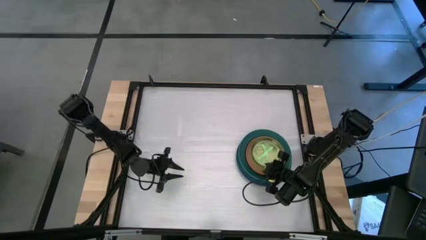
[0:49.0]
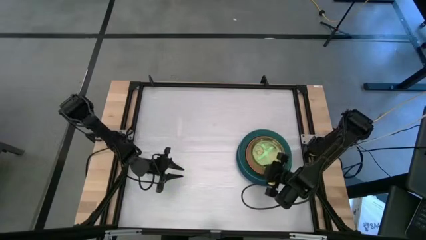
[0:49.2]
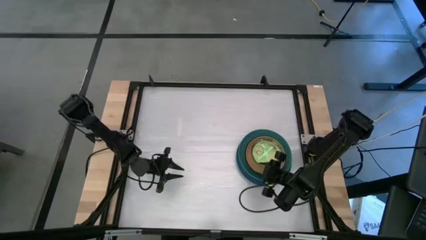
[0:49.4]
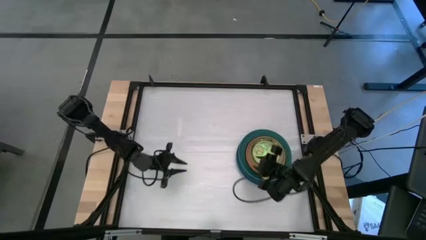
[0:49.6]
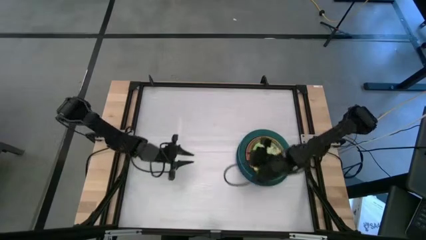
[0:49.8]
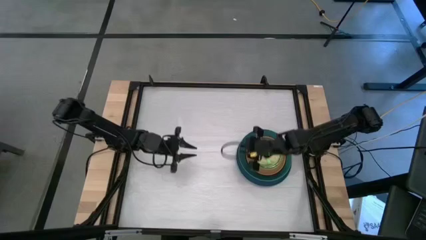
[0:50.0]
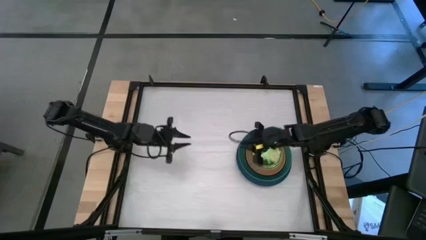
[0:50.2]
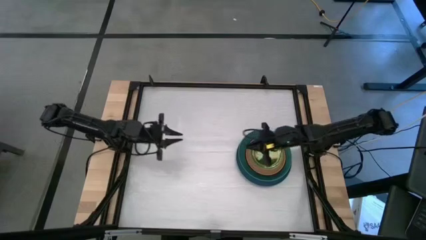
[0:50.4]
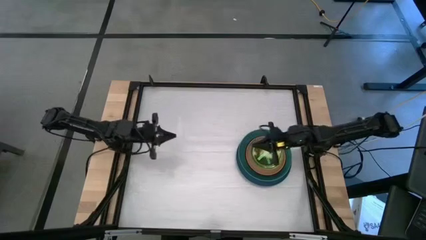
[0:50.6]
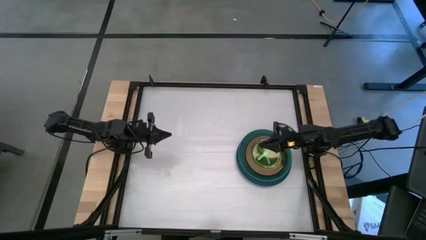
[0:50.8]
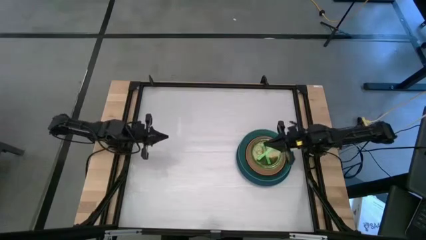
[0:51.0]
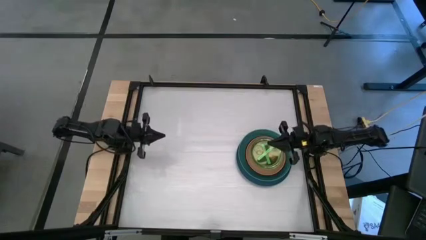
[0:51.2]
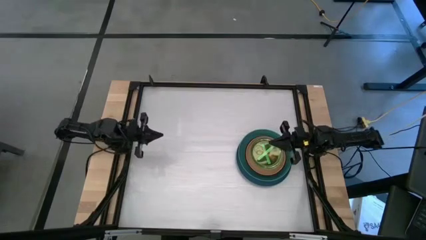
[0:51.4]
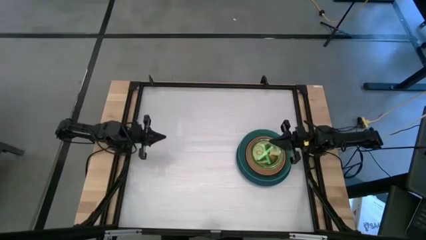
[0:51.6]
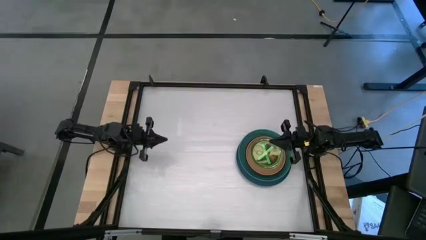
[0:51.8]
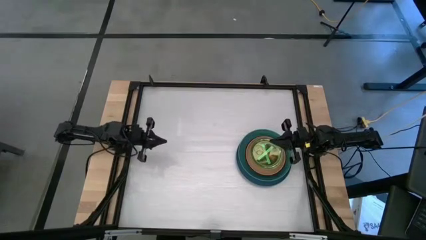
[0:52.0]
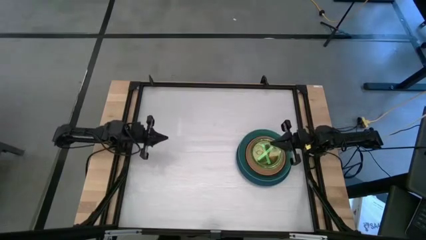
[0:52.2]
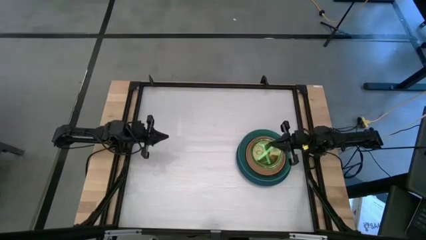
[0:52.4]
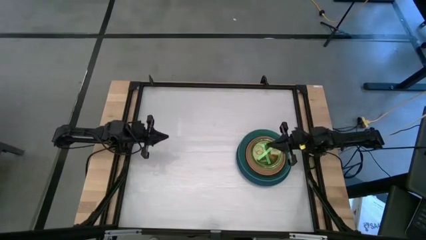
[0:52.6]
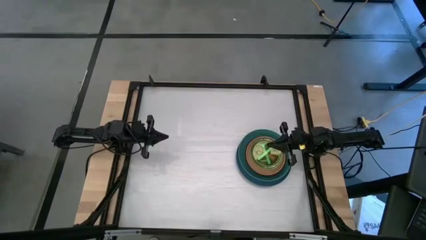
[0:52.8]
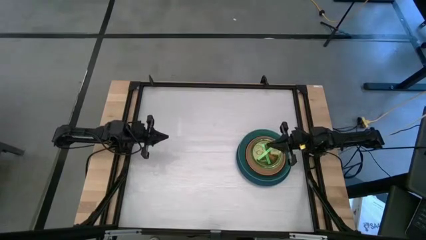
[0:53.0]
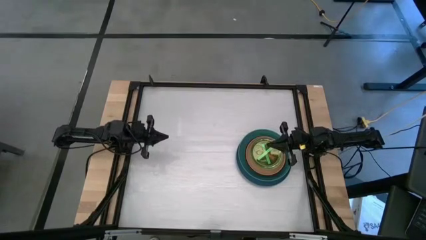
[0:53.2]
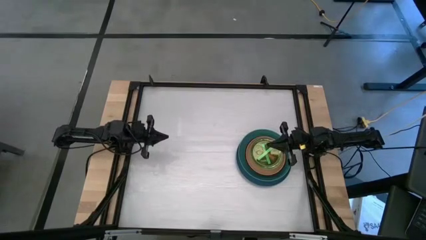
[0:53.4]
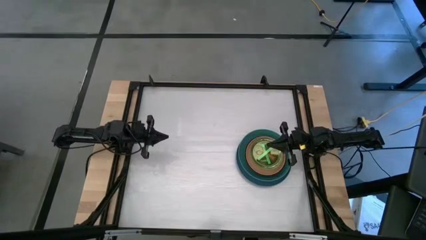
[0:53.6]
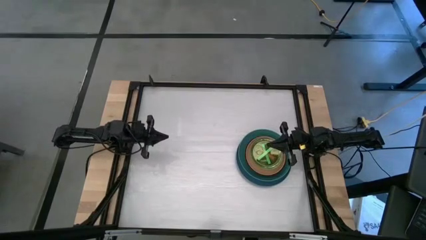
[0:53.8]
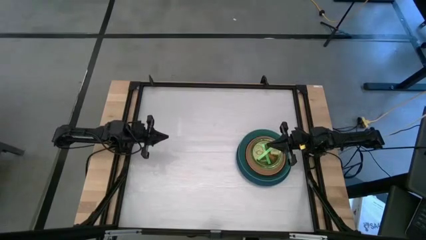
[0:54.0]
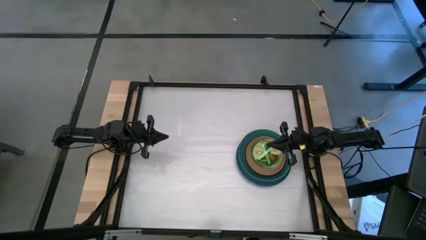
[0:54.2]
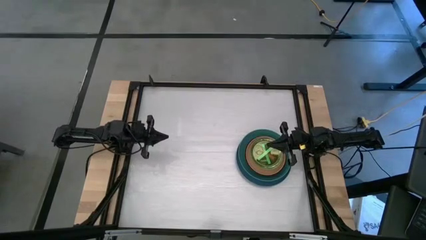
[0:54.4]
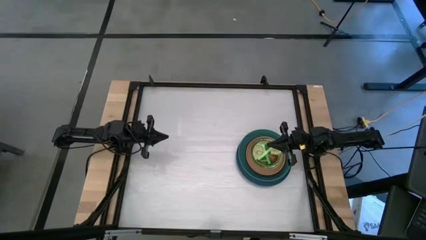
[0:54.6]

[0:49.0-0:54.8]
Task: Stack plastic plates
Return to Home Position

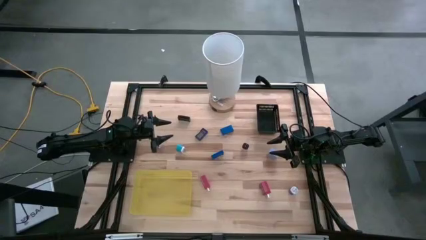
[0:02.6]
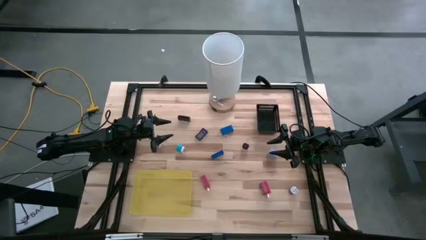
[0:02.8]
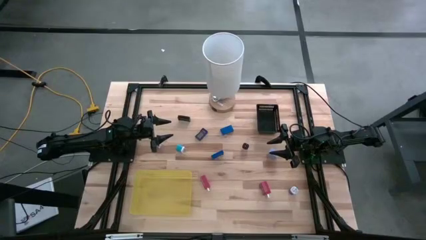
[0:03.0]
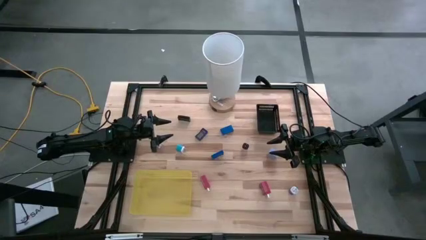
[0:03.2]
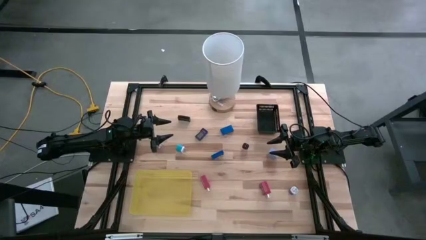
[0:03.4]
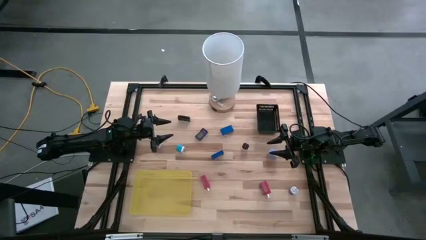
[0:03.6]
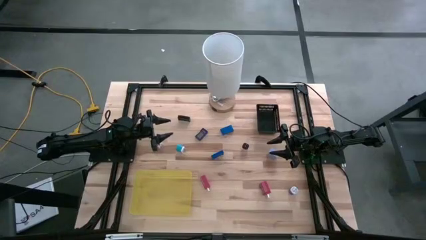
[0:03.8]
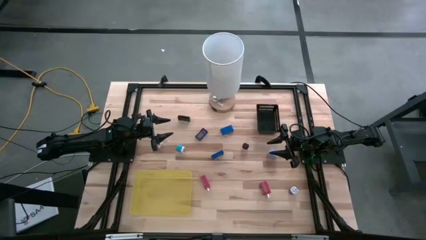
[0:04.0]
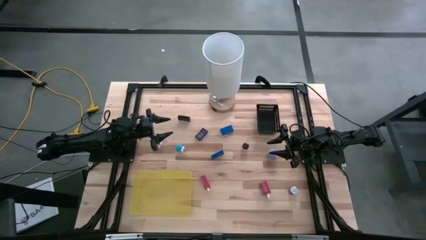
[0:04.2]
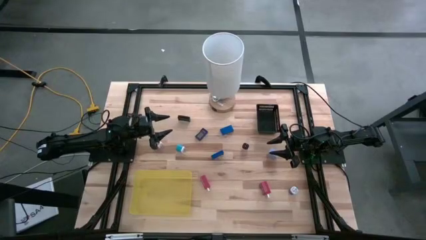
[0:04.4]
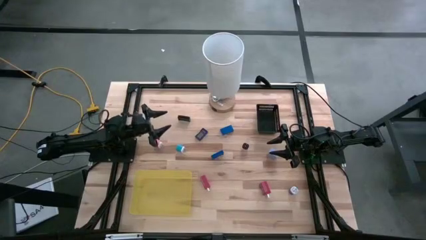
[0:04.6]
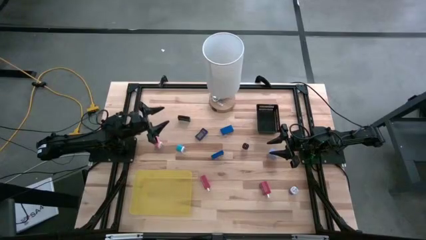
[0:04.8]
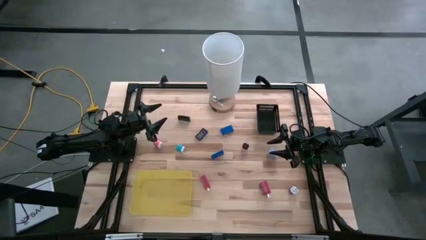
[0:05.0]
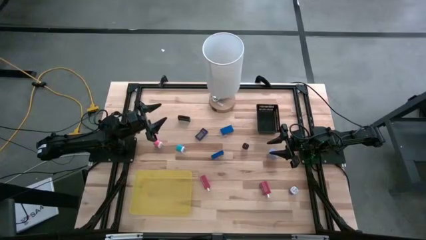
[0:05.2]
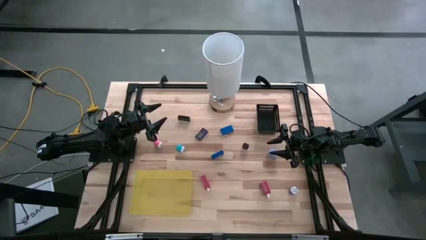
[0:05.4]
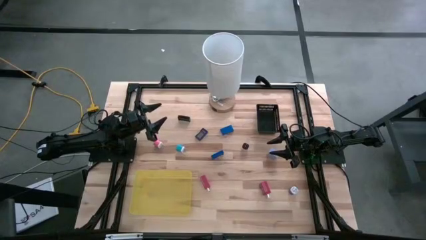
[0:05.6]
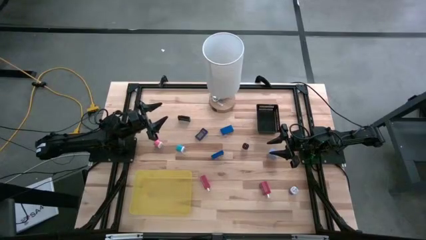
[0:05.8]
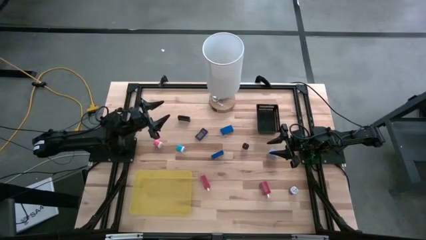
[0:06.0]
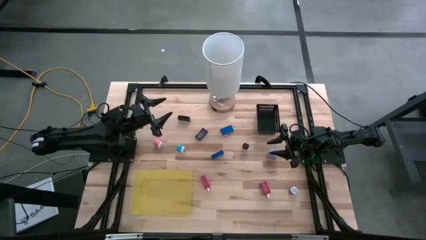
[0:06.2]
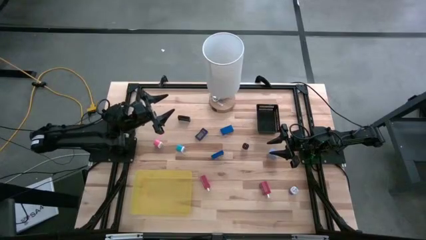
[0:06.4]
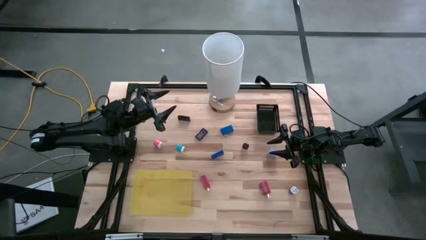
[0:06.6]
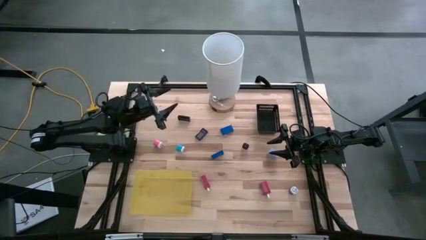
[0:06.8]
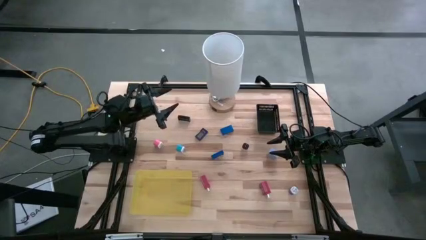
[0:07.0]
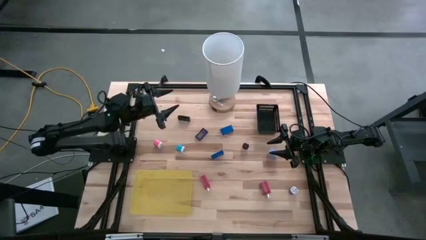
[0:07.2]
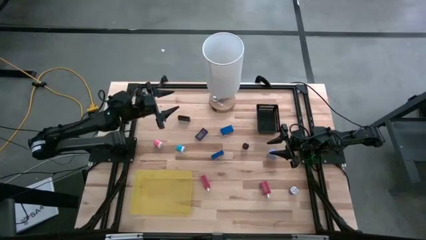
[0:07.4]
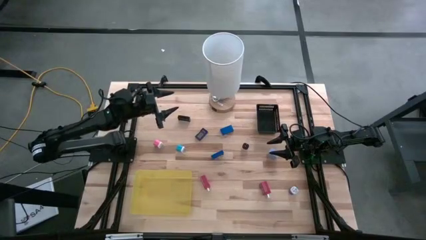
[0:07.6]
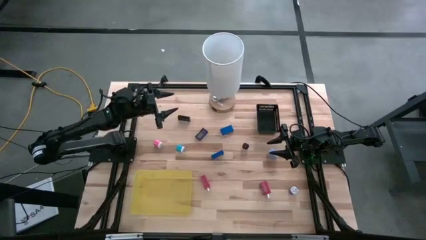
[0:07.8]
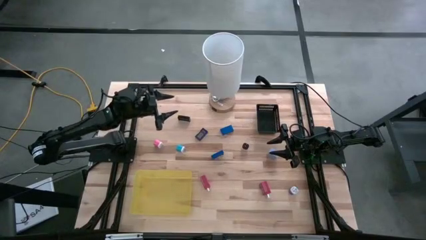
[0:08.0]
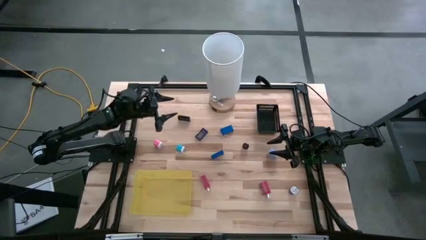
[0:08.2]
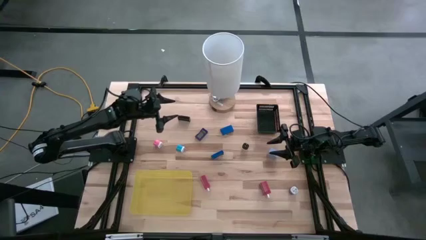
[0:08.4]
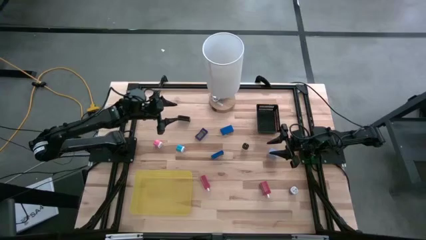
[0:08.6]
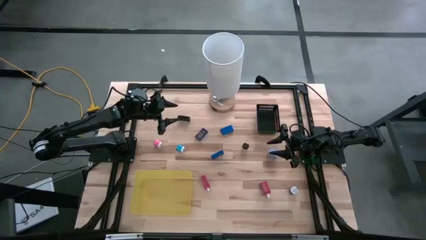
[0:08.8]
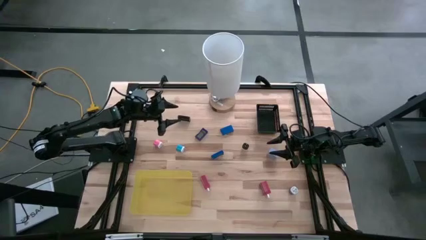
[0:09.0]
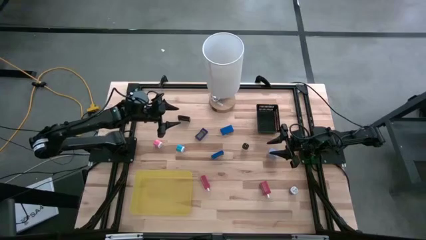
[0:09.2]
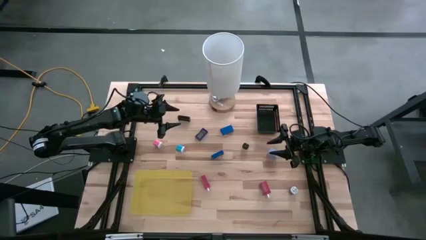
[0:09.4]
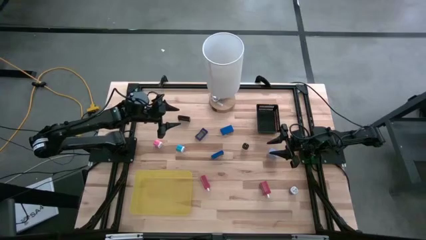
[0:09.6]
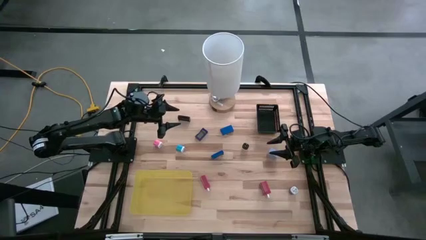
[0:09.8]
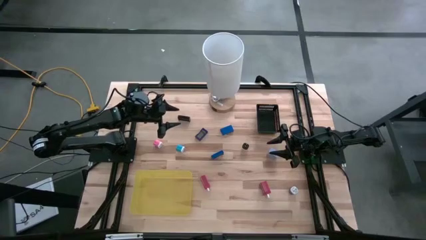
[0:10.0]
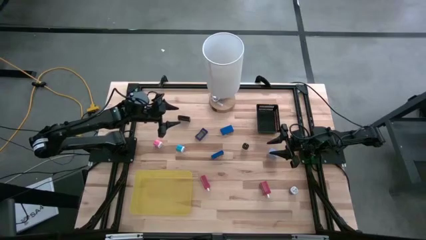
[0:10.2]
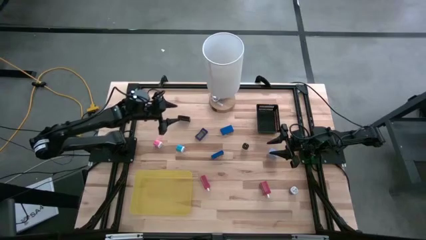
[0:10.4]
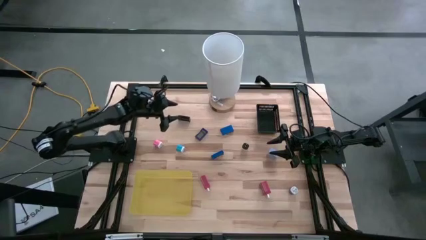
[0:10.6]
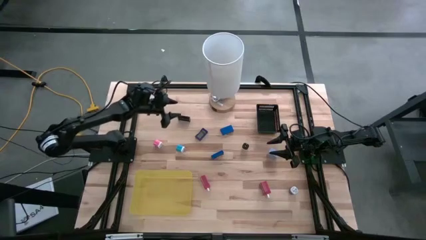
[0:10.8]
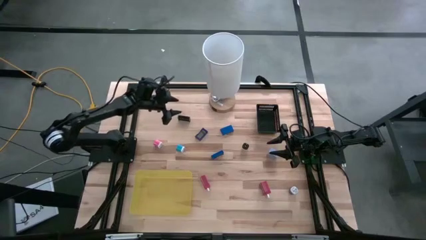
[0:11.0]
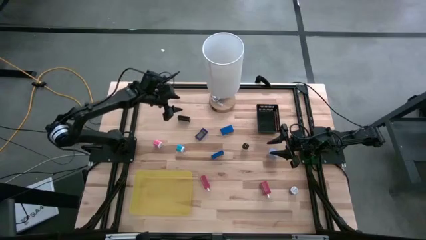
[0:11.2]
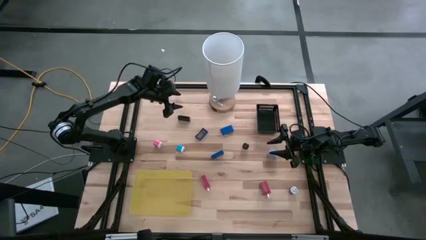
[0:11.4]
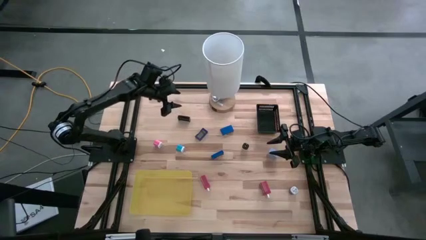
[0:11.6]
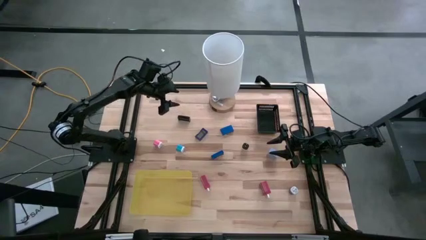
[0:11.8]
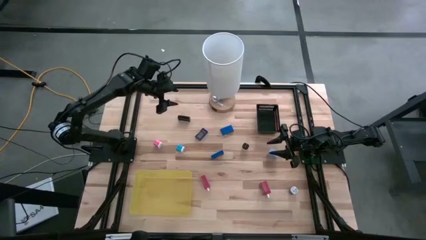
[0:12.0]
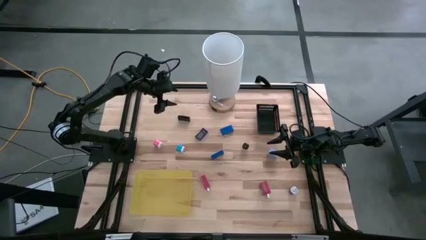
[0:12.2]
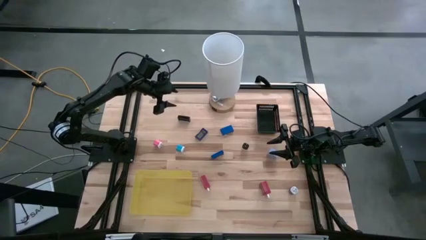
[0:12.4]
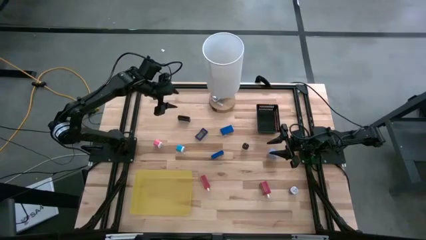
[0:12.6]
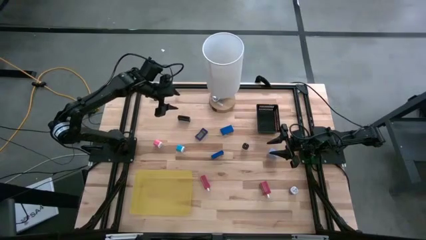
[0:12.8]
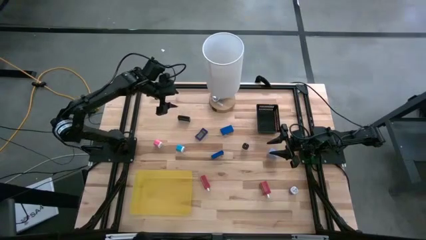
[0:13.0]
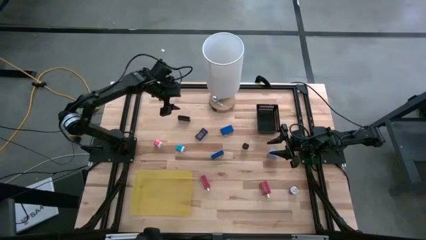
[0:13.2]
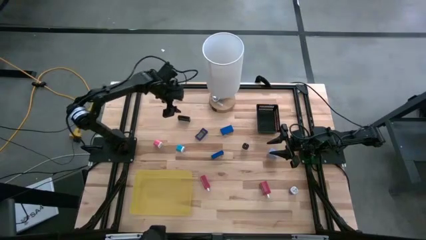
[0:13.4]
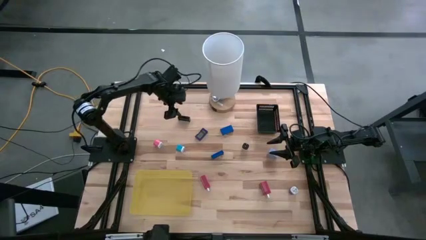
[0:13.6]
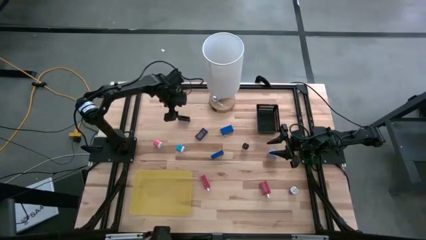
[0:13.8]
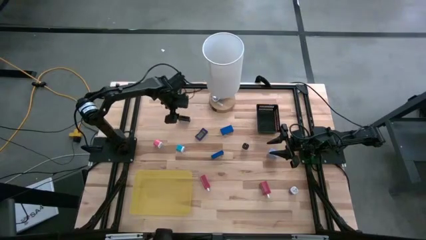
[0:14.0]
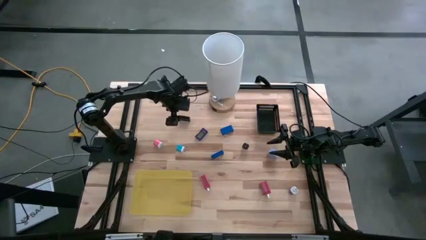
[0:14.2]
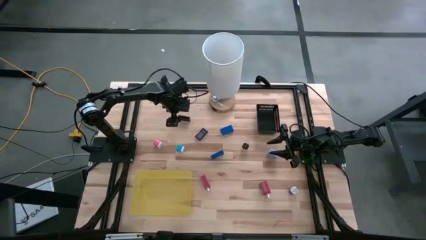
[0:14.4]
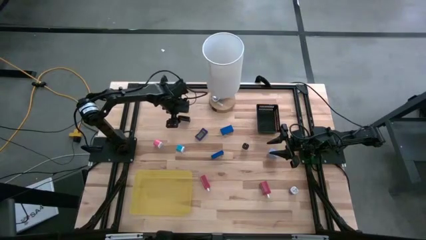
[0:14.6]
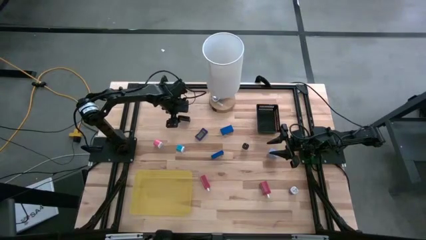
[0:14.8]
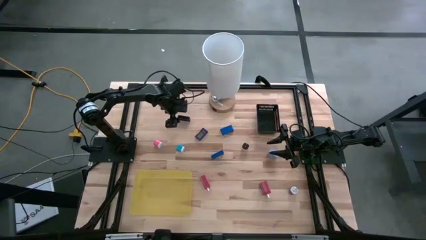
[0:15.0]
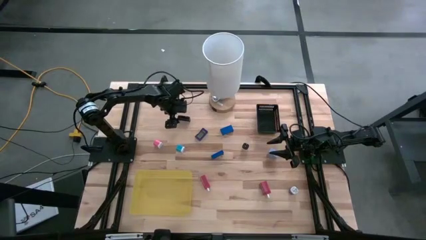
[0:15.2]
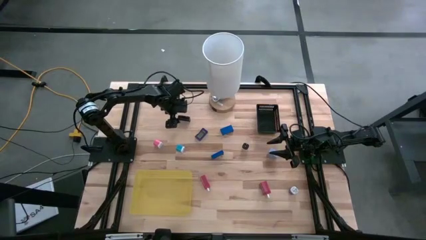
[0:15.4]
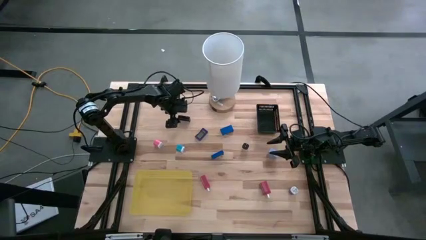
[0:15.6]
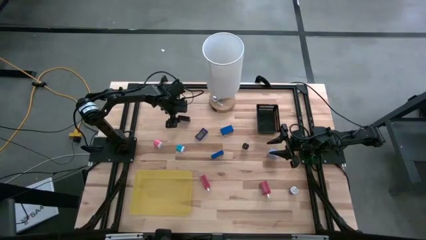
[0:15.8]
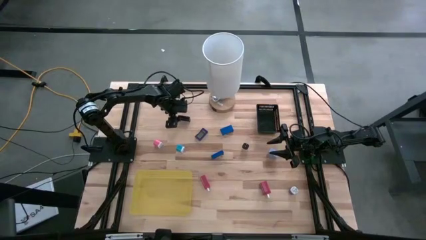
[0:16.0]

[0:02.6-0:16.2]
Task: Pick & Place Office items
Put the black digital clock into the black bin
